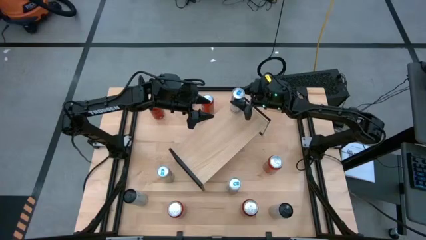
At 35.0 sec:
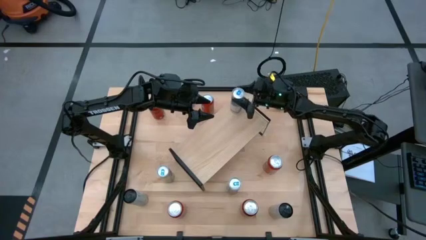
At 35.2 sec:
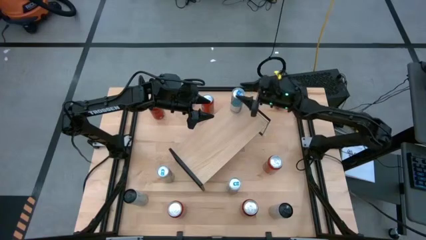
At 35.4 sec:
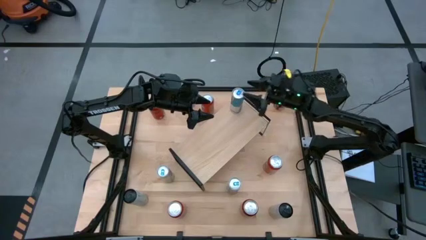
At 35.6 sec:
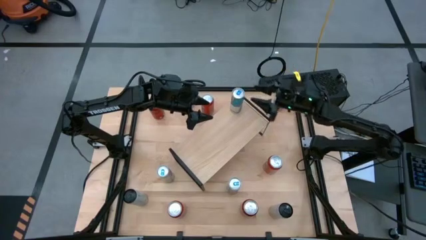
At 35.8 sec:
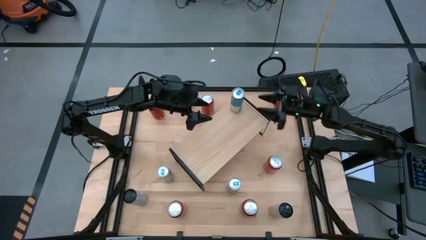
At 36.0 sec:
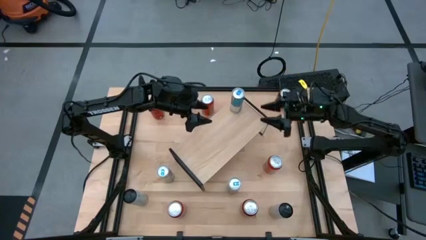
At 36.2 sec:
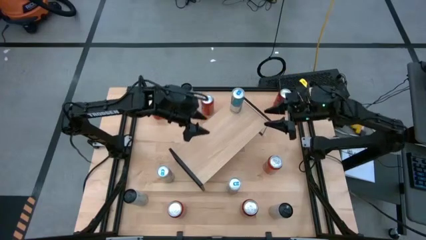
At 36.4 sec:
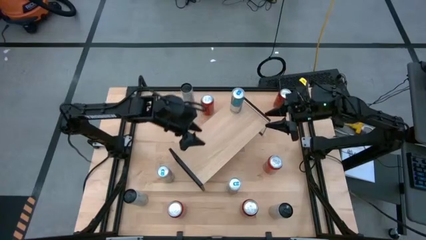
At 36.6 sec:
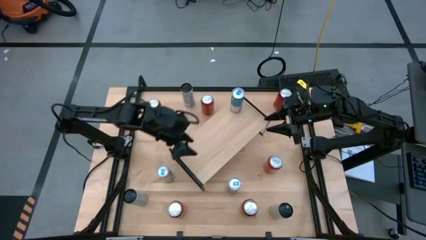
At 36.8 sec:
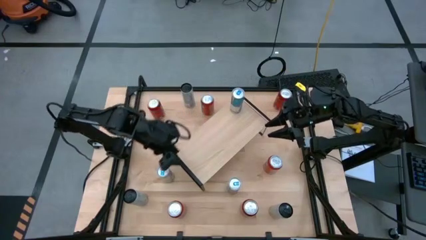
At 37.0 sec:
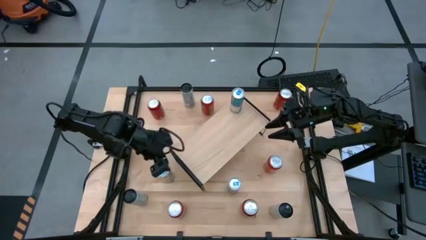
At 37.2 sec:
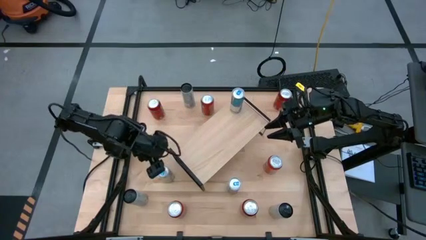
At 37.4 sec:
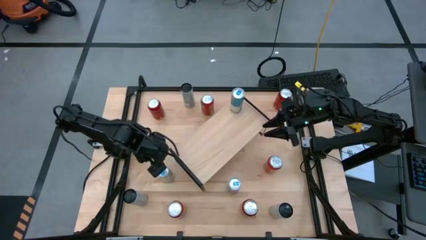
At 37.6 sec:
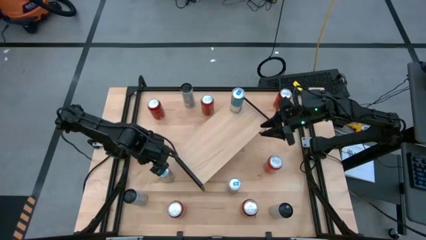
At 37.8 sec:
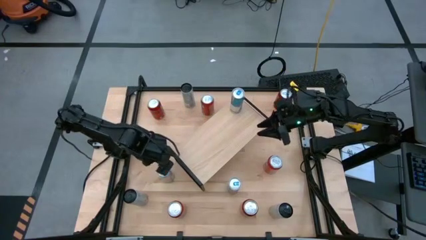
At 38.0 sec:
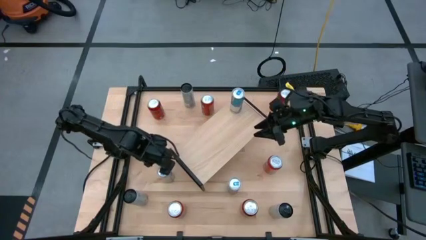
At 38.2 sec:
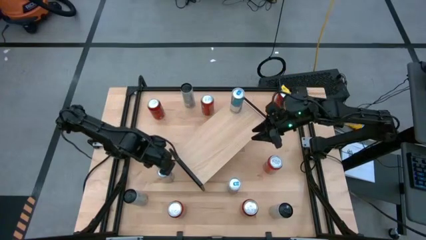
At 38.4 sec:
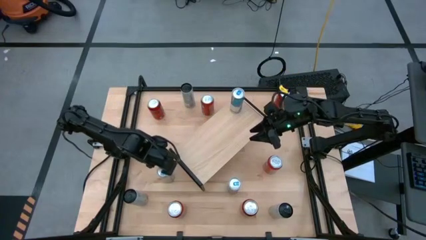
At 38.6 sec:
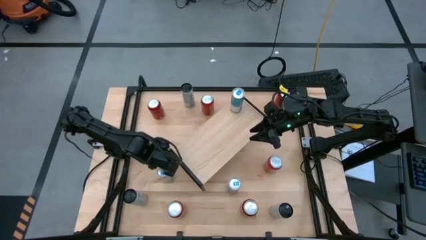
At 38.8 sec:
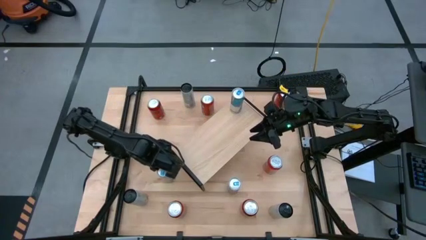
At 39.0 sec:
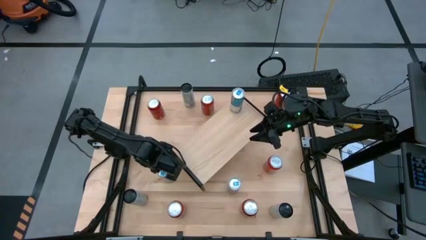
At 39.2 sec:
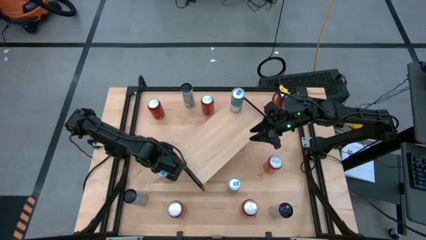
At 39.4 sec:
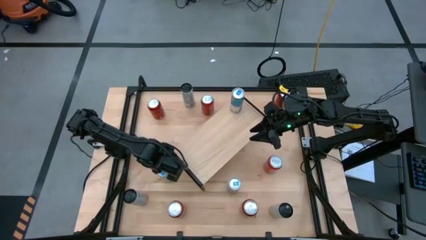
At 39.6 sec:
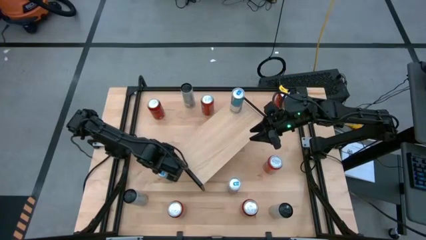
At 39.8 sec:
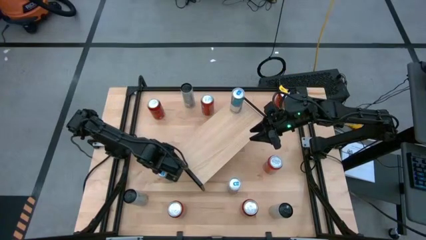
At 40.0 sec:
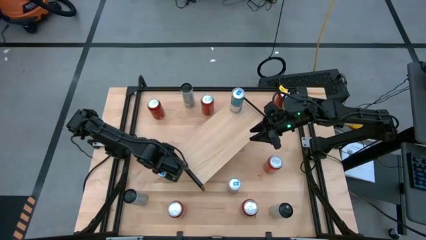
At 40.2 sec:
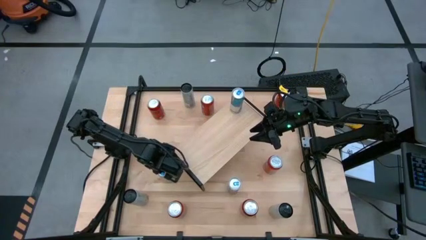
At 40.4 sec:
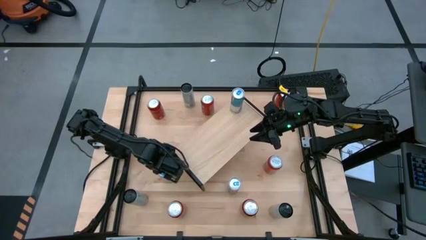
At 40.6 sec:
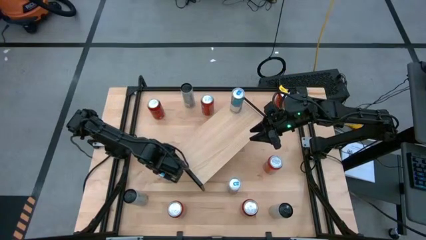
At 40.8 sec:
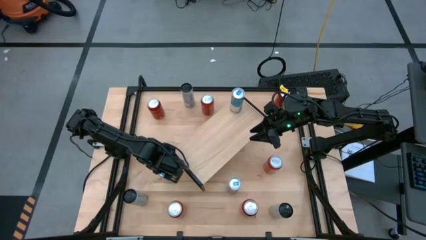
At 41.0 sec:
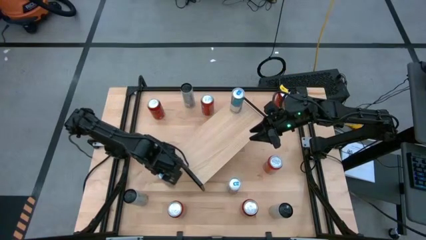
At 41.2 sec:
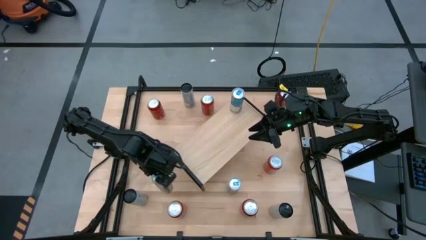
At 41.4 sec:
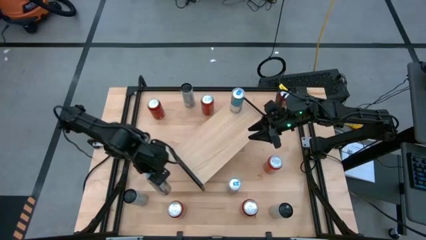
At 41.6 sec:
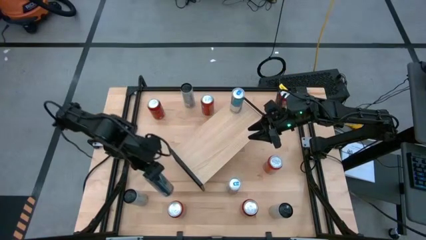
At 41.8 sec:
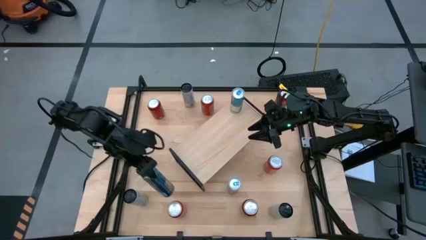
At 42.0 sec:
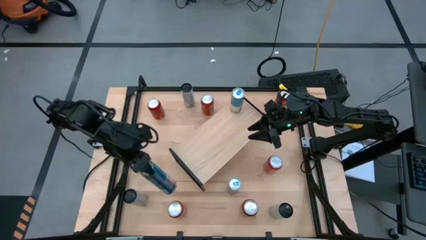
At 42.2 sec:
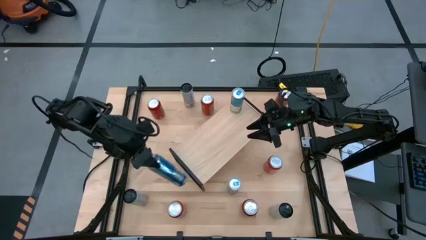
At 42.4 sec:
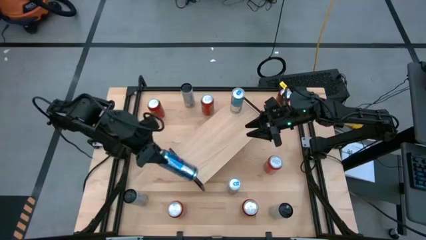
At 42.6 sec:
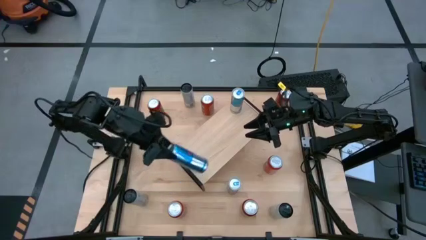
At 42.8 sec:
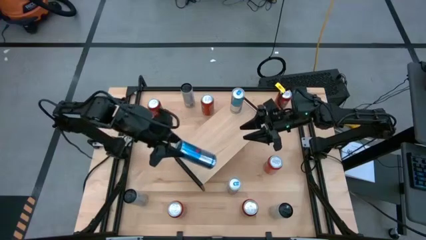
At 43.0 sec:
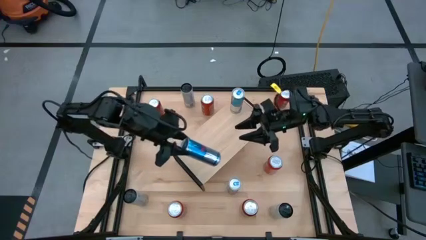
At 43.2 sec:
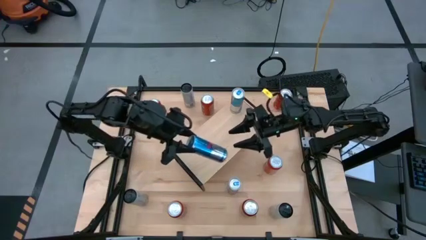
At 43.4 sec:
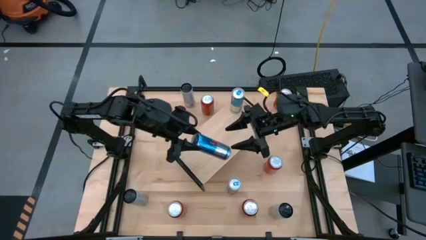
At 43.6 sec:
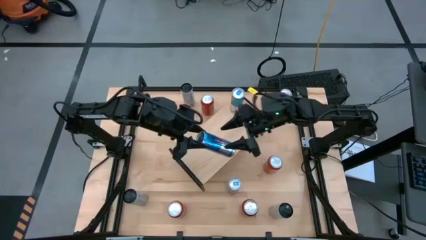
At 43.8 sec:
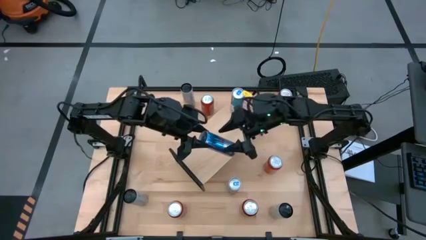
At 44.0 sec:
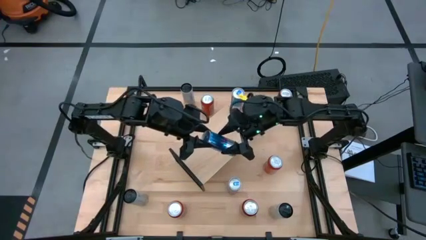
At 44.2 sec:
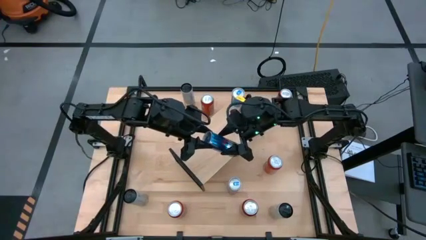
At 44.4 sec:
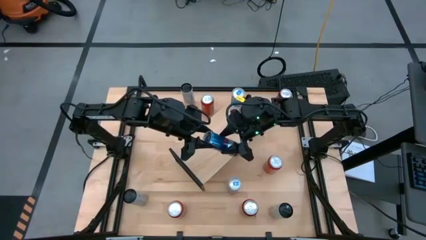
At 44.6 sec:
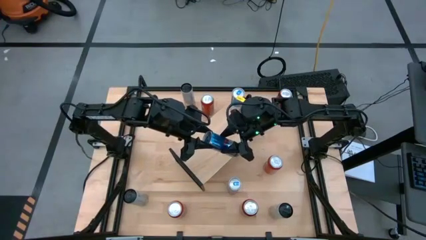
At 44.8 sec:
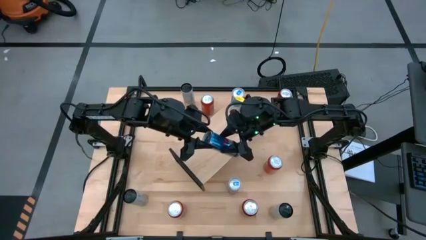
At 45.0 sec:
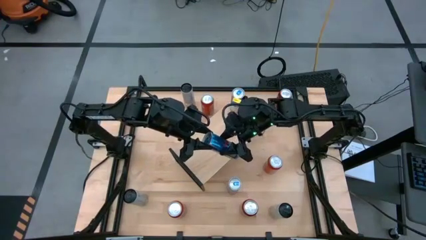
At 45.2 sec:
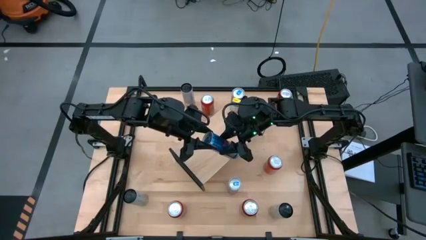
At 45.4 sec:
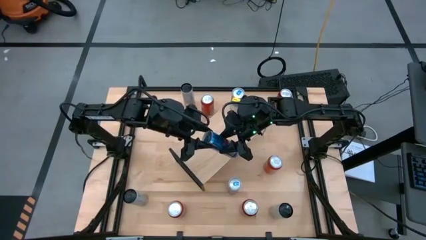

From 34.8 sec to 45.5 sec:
Task: Place canned beverage on shelf
Put the left blue soda can on the shelf

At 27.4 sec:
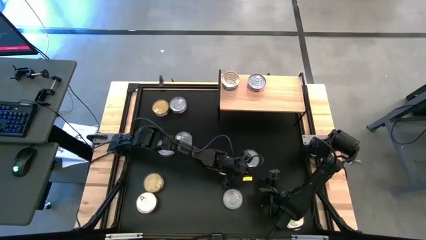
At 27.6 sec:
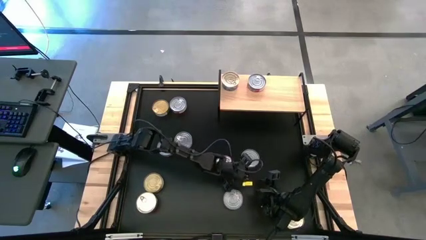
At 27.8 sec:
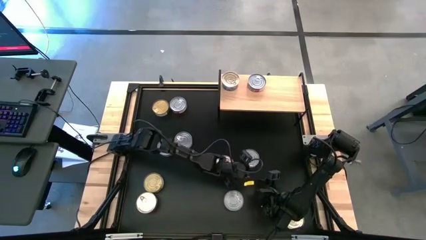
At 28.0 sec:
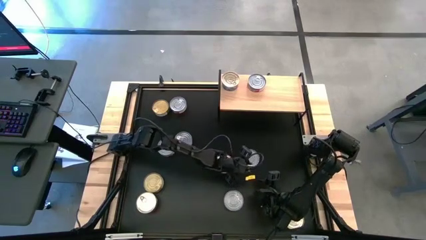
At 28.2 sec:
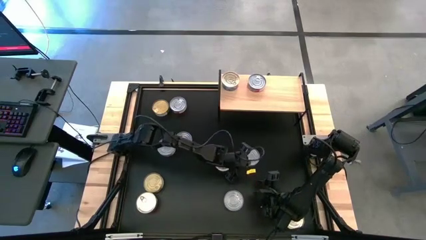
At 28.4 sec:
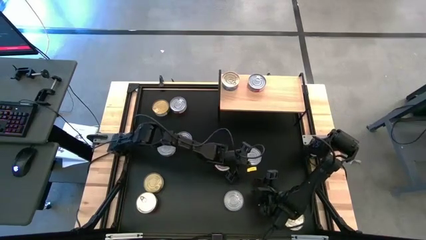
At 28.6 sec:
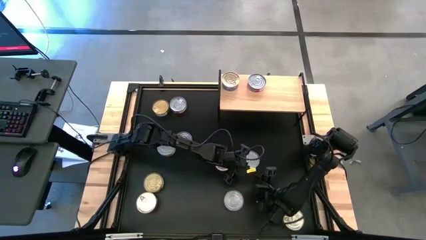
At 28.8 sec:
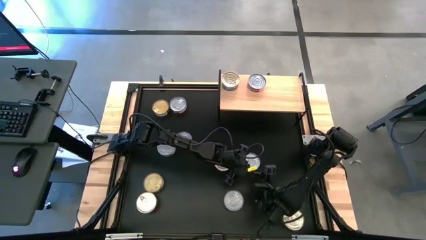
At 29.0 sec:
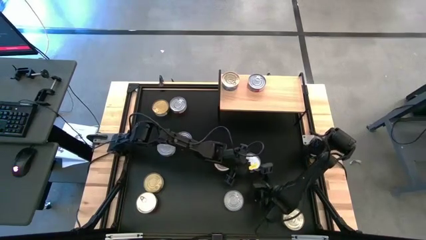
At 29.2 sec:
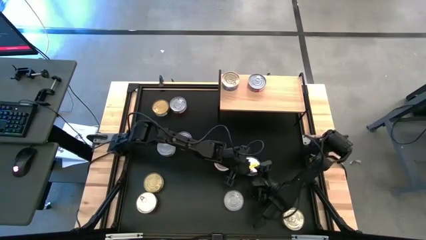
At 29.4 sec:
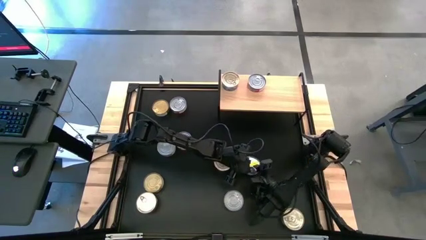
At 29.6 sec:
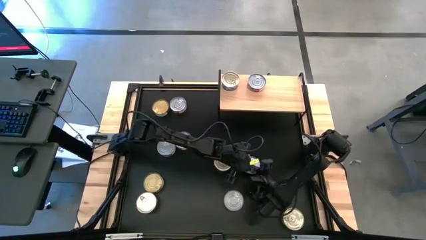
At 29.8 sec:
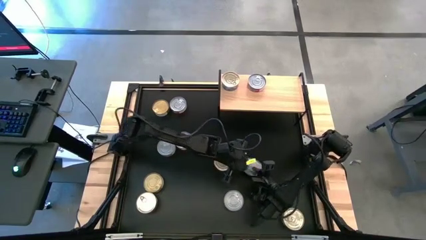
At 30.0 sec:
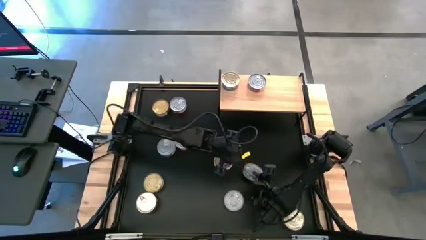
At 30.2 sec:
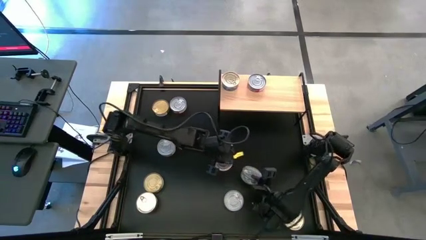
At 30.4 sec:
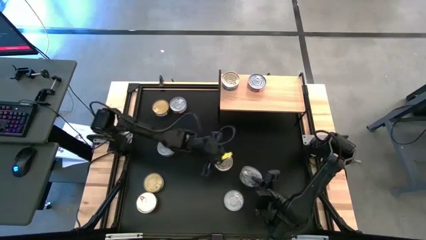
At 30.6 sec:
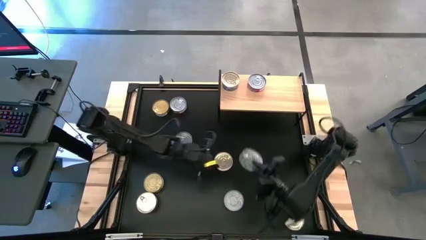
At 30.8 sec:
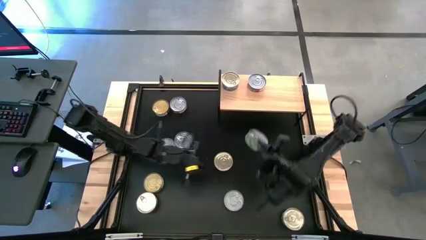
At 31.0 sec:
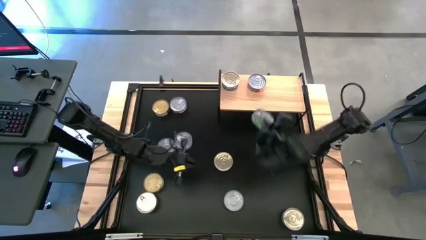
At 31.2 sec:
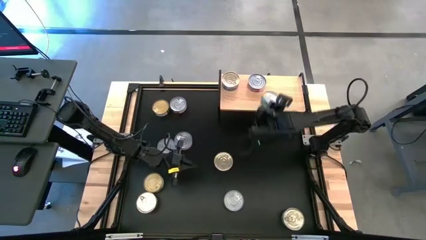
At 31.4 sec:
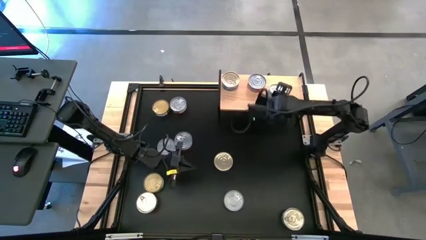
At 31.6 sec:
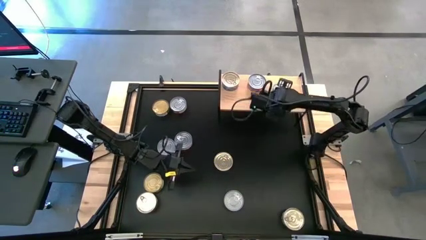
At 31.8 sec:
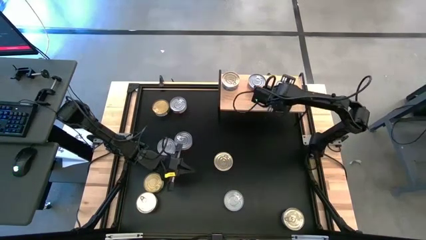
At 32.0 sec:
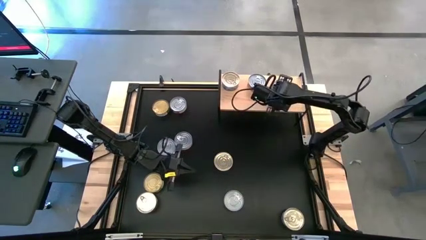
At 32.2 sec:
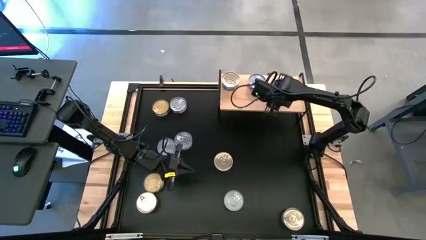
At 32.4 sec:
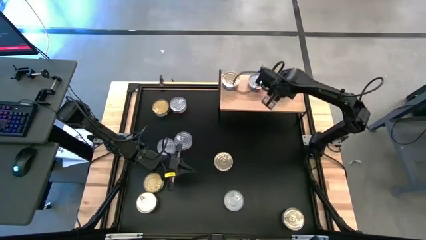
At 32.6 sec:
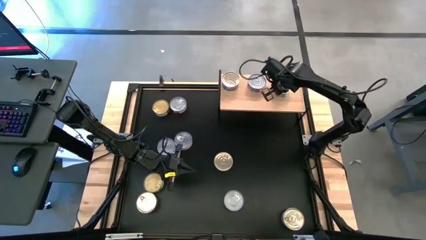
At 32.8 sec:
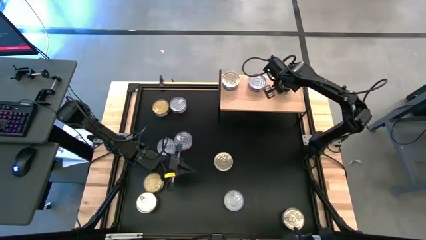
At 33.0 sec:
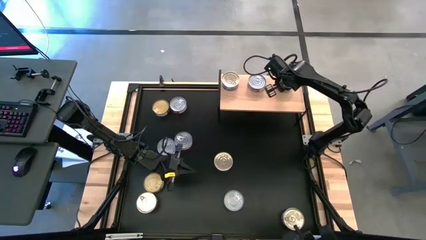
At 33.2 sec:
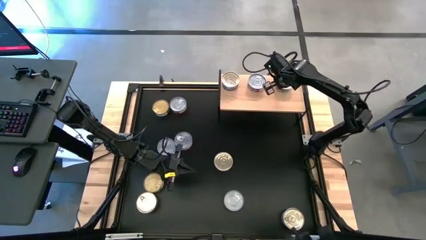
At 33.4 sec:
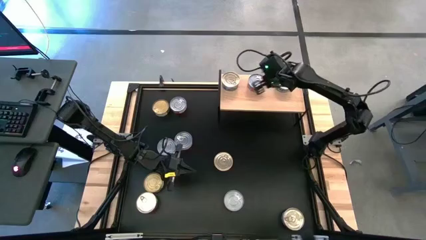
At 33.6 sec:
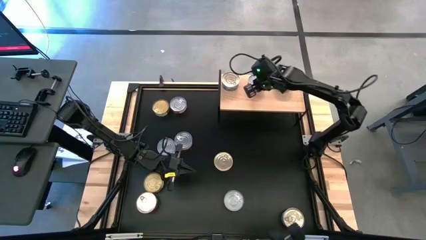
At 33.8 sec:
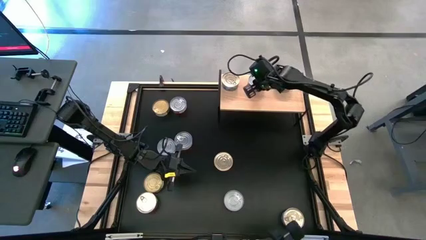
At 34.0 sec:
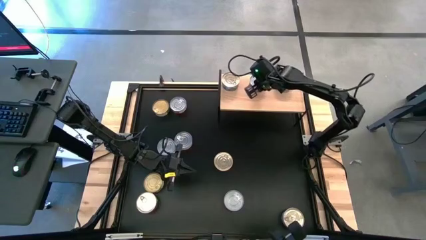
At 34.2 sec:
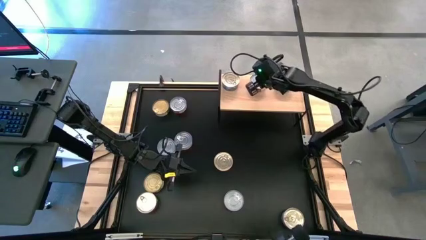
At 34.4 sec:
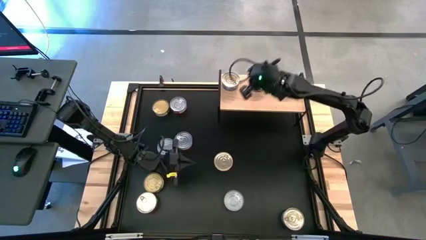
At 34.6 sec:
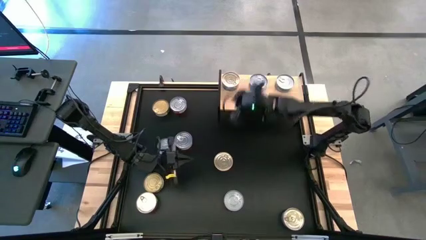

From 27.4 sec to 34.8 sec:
Task: Stack canned seafood by type on shelf
Put the green tuna can on the shelf
